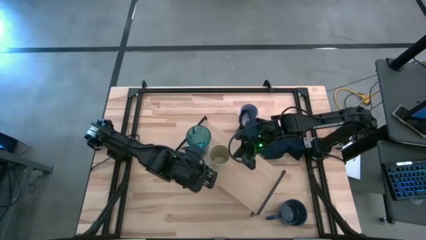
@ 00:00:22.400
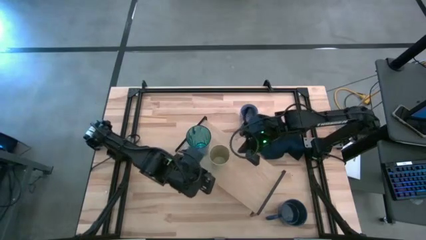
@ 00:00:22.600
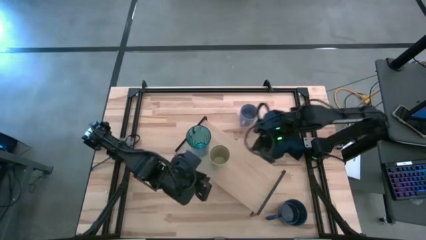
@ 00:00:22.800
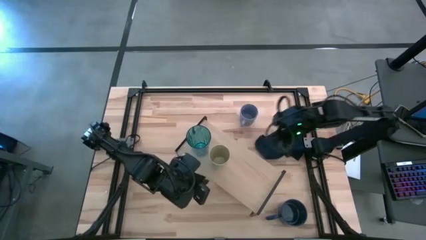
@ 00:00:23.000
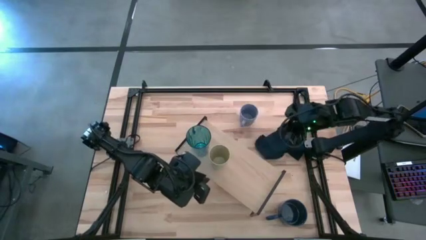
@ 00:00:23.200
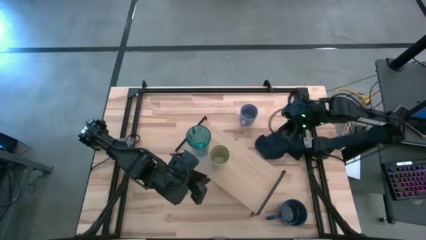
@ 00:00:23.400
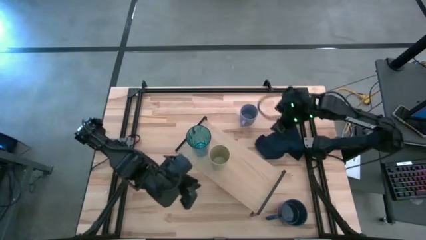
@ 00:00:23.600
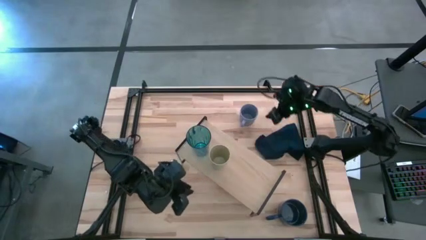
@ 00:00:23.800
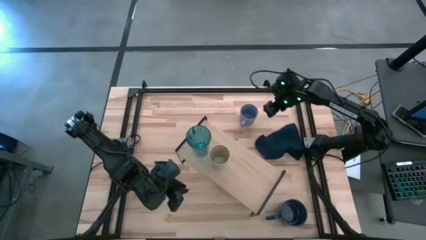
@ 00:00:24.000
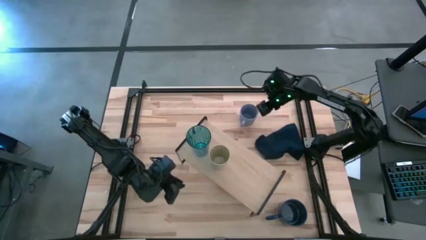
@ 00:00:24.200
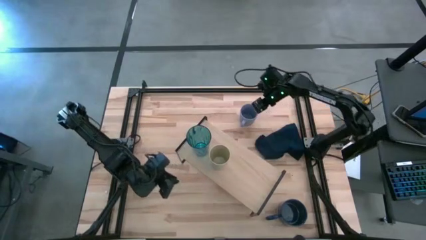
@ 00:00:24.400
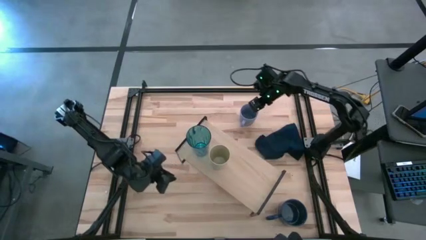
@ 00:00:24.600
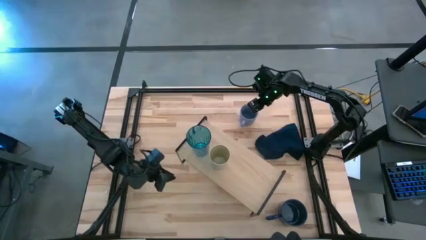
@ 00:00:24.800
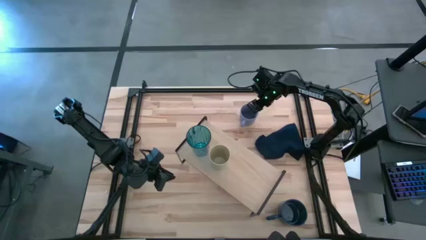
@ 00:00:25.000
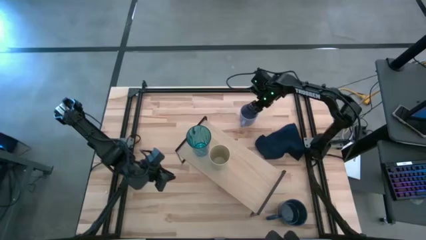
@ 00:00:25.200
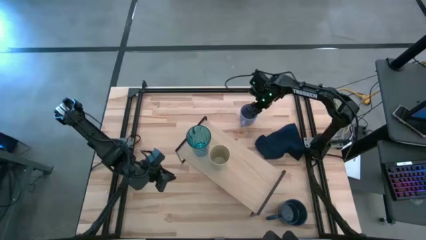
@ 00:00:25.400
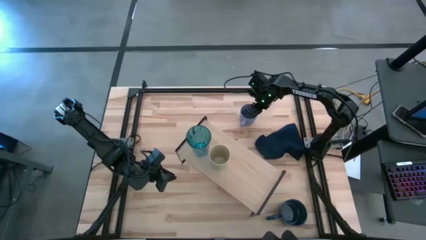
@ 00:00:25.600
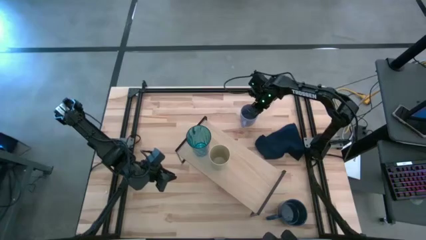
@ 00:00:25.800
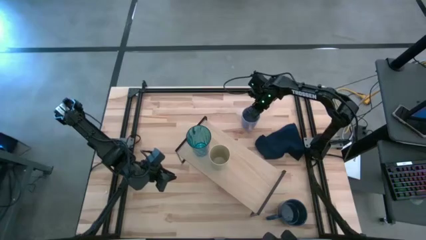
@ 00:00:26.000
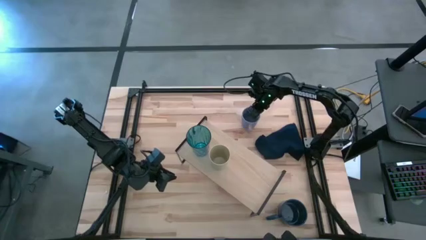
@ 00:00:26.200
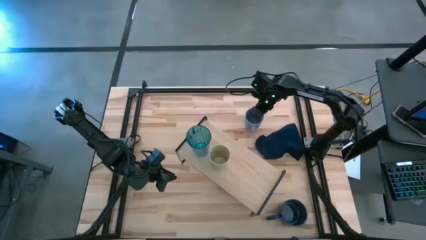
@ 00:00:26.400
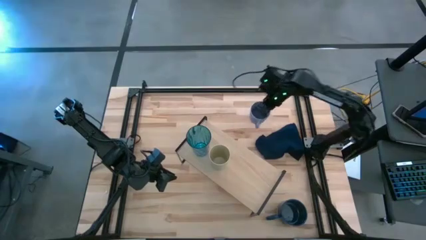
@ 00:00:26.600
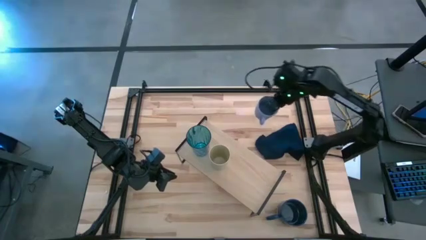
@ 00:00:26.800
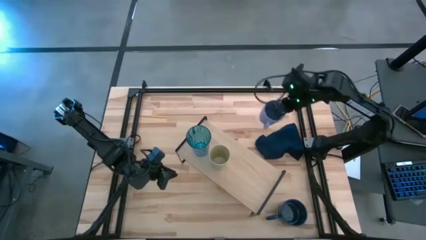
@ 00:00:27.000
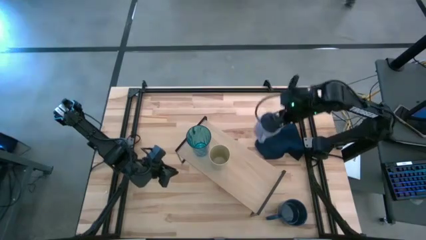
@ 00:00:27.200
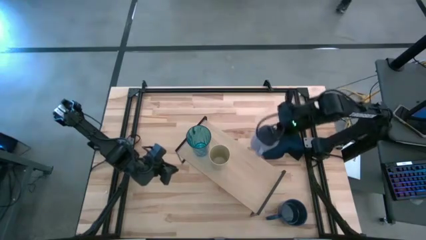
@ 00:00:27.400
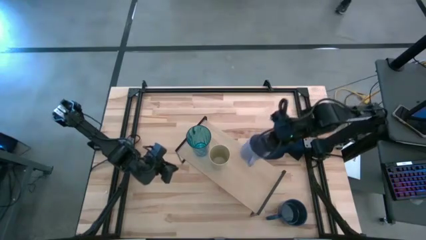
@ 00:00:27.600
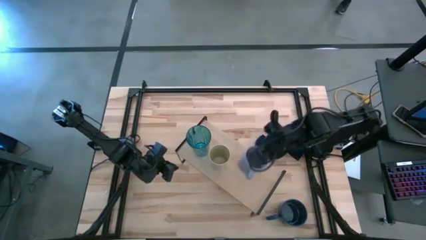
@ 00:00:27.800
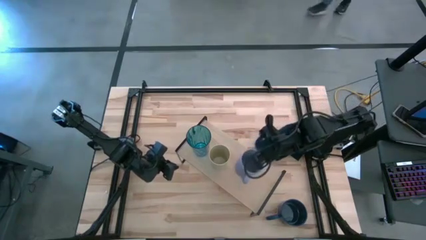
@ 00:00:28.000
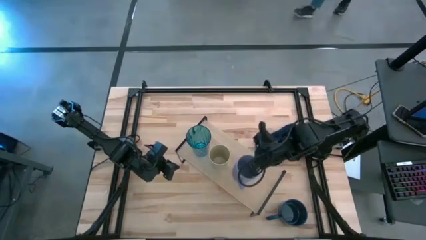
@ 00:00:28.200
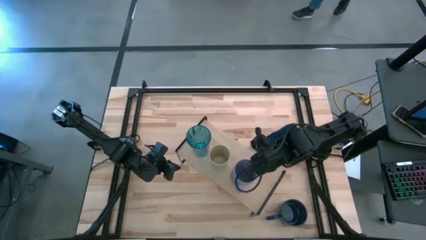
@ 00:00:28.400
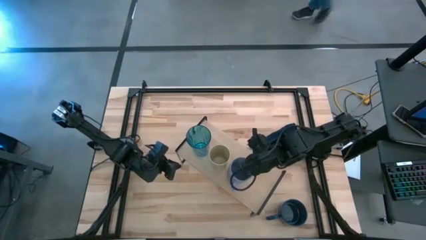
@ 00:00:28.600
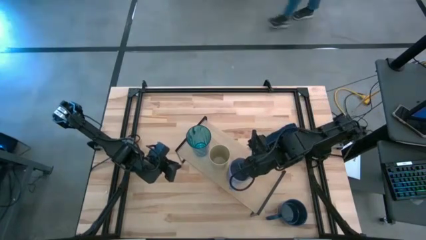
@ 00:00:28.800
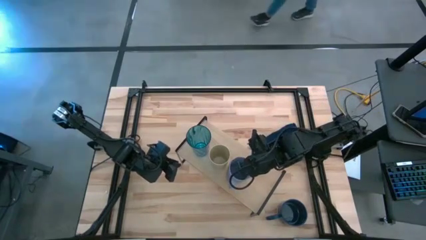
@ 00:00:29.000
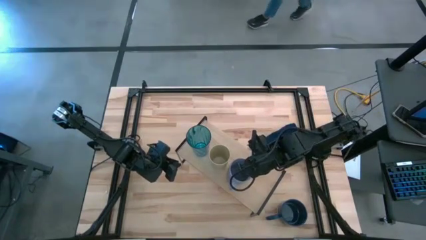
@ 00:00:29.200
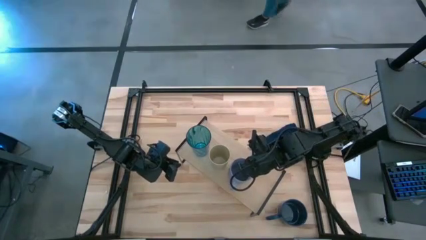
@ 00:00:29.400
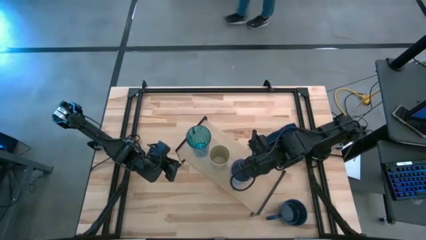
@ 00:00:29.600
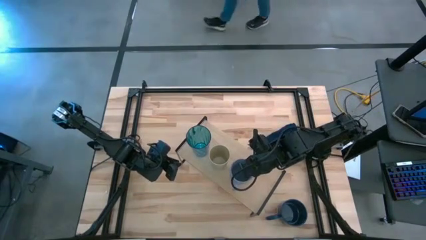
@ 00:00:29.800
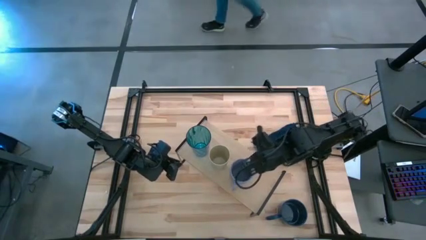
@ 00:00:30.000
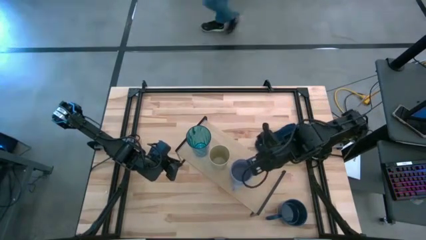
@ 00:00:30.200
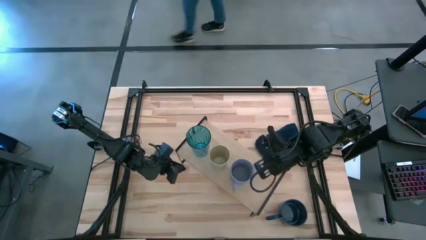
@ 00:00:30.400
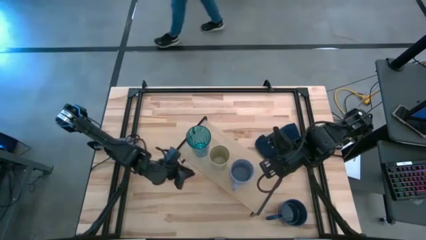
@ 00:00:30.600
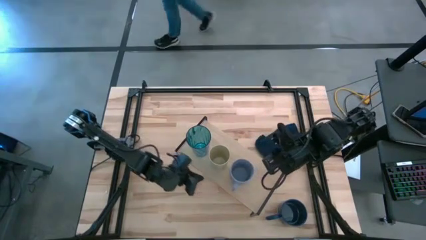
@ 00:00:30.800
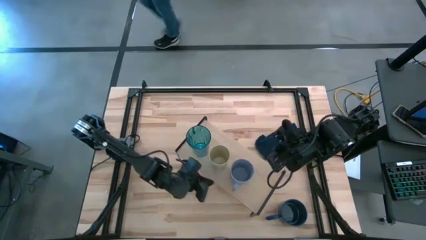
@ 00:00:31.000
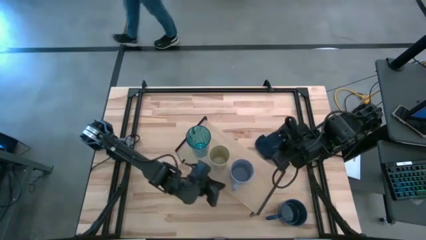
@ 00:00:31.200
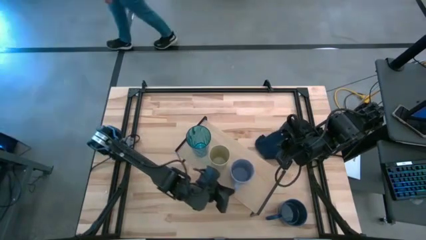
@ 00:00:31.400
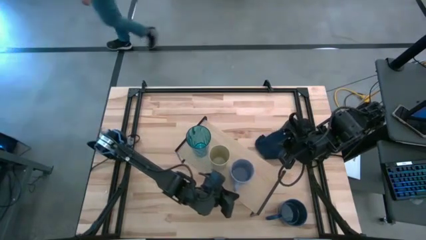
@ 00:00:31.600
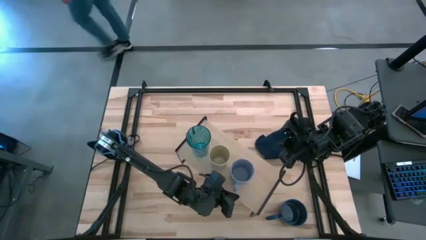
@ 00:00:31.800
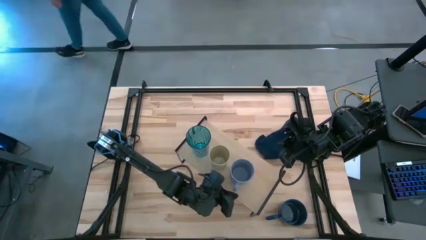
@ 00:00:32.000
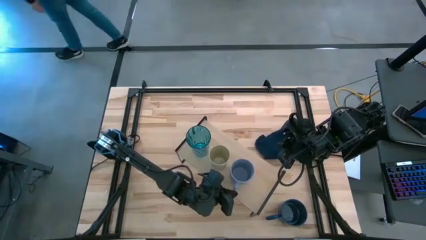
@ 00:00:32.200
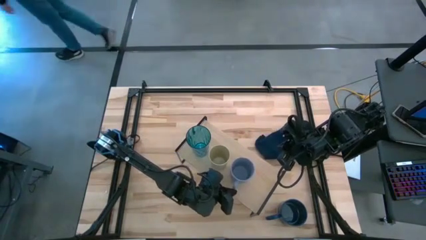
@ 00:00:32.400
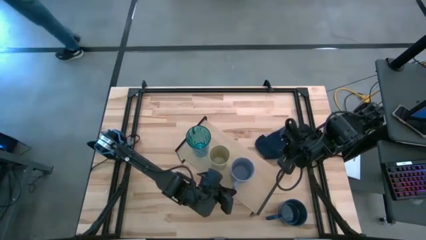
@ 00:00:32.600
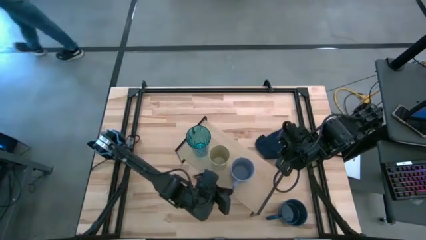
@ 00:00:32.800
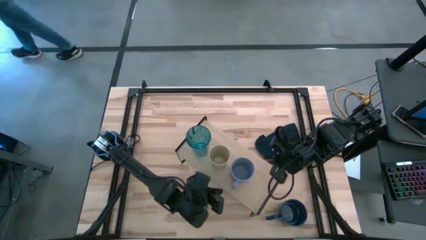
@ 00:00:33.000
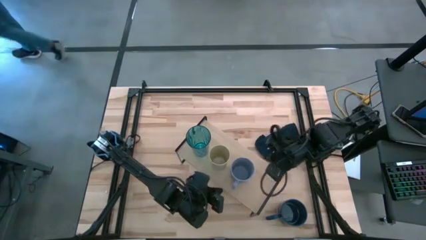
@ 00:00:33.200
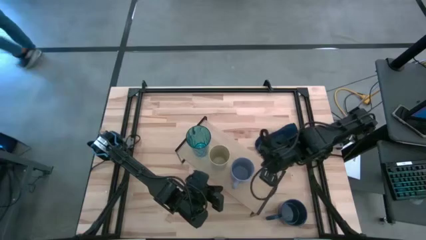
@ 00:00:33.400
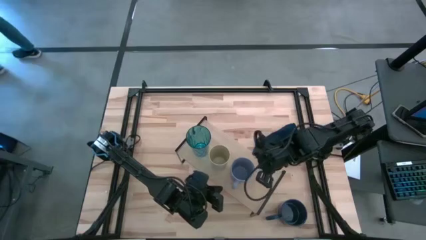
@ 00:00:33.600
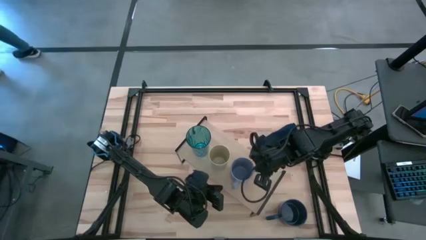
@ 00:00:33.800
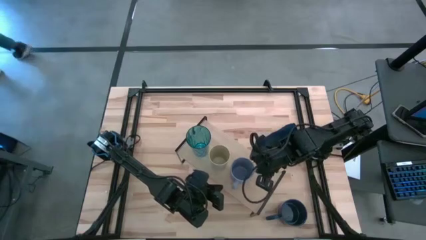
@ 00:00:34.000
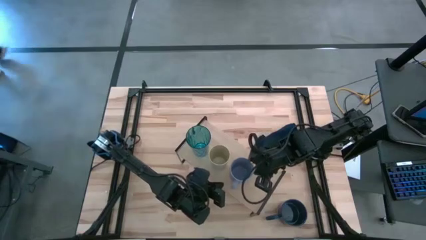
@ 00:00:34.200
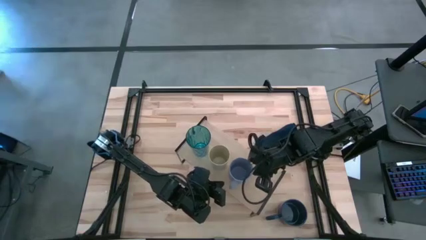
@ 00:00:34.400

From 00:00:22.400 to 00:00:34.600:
Task: Stack small to large cups/mugs on shelf
Put the light purple mug on the shelf

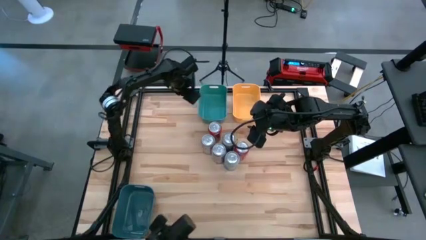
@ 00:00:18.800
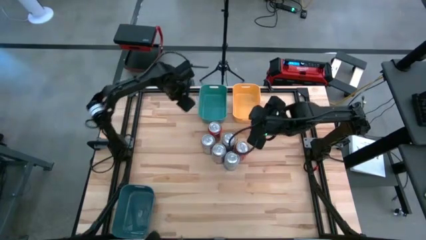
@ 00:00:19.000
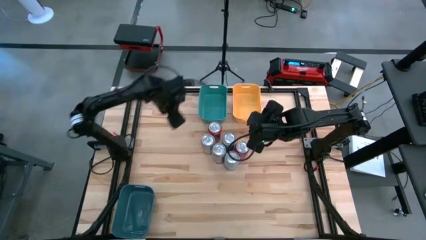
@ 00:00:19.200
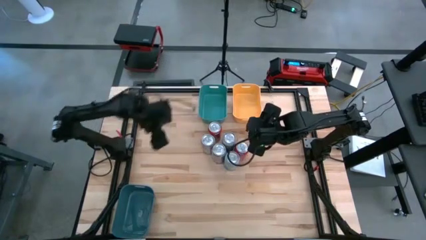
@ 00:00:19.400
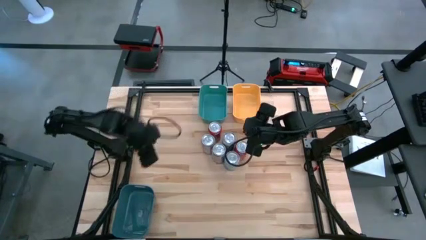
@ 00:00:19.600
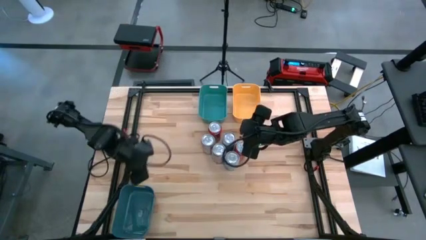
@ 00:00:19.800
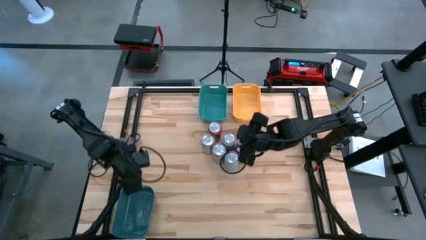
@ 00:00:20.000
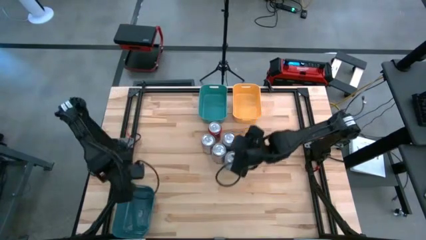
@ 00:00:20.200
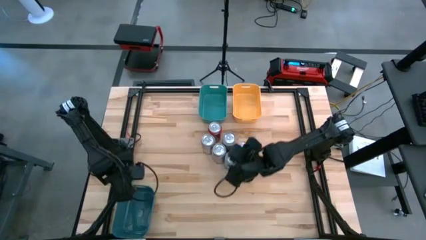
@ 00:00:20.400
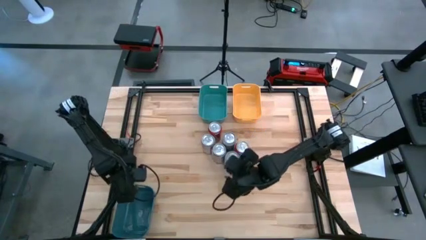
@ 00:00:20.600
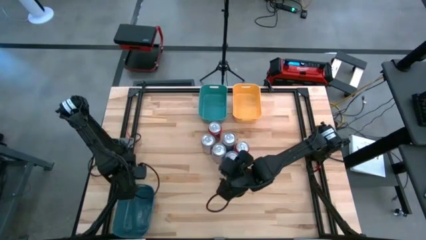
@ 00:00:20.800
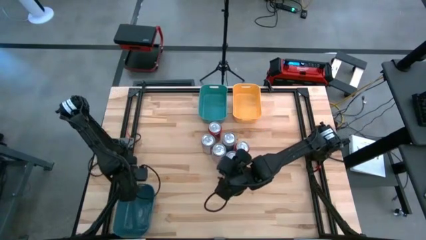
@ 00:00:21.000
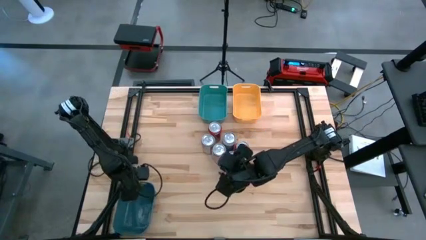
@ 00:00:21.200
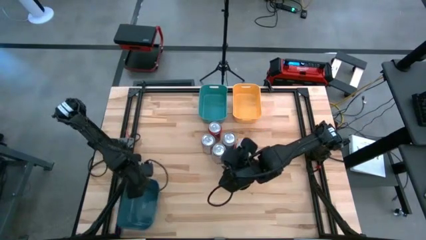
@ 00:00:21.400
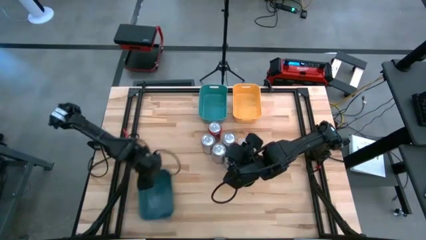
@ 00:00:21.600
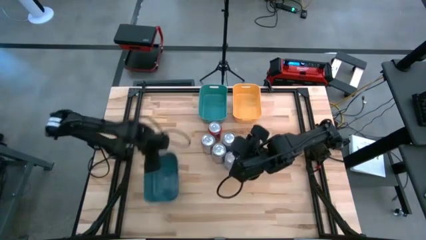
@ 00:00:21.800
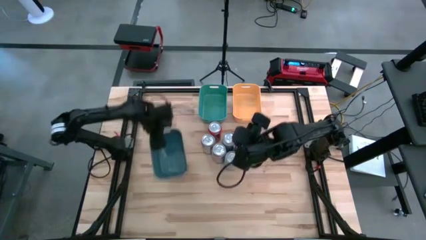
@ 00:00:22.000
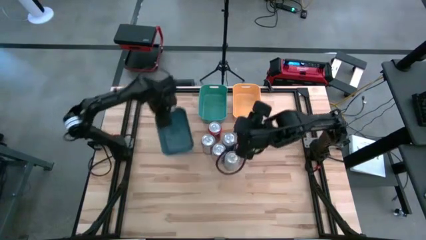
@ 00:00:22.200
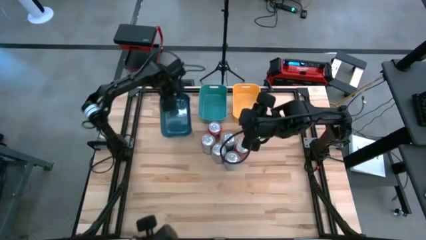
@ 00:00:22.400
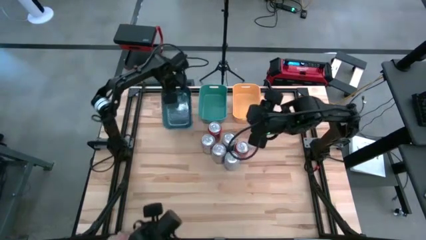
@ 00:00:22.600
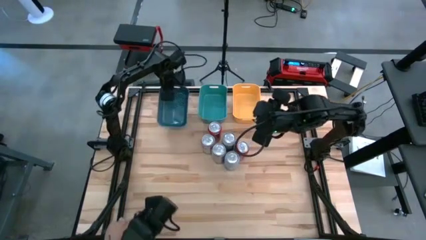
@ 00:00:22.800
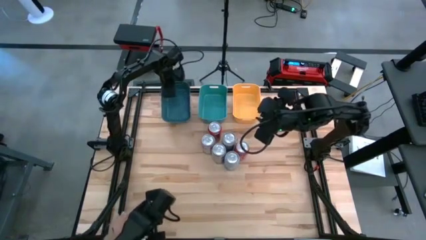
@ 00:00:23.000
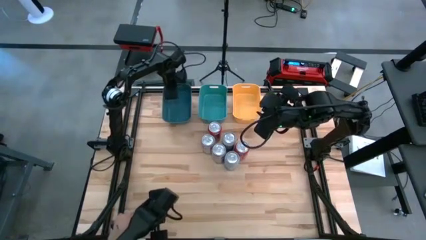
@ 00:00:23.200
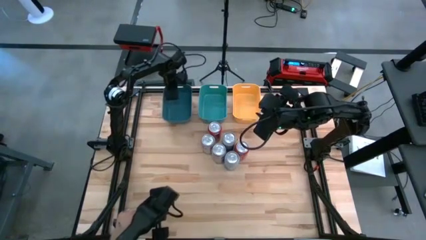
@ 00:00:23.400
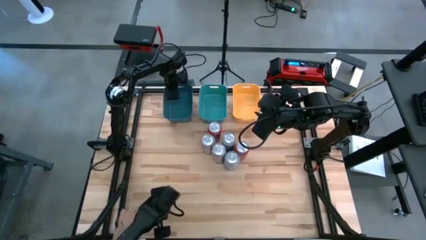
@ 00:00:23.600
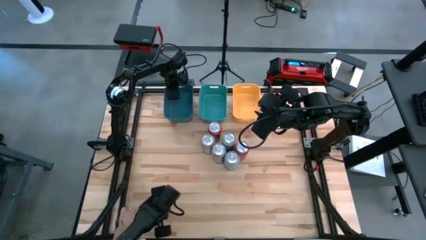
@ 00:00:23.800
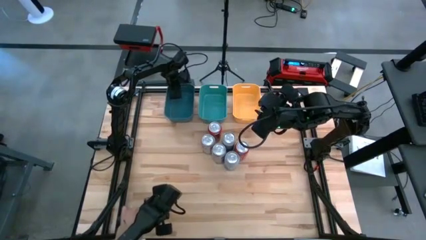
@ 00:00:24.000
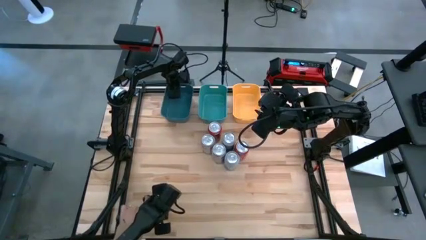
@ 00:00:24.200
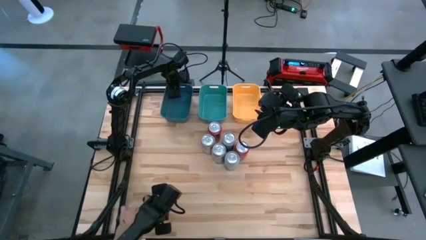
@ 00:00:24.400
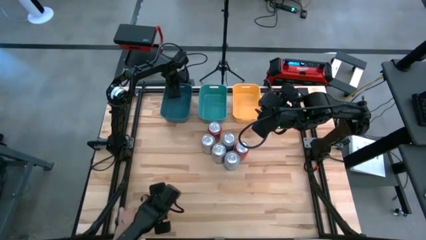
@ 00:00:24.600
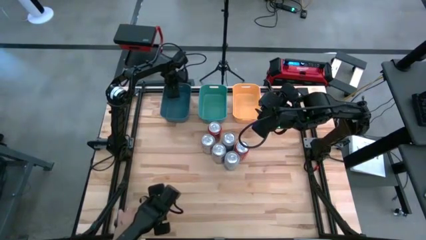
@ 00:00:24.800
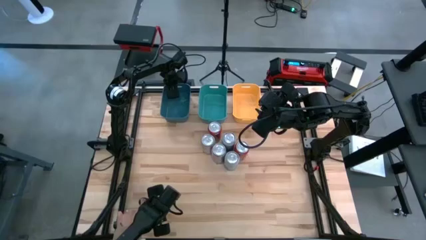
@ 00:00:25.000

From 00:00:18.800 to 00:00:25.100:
Task: Sort soda cans
Move the blue bin to the top left of the table
